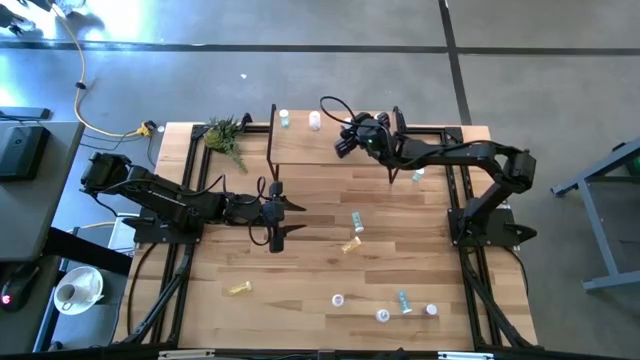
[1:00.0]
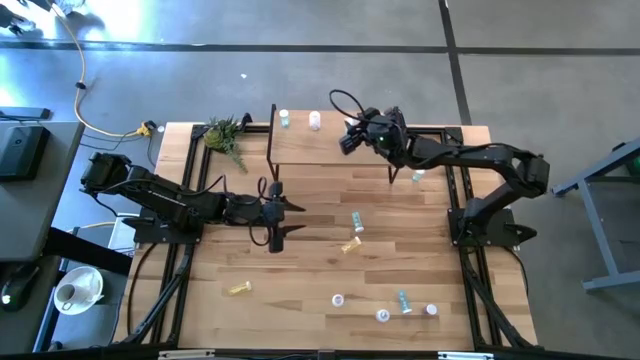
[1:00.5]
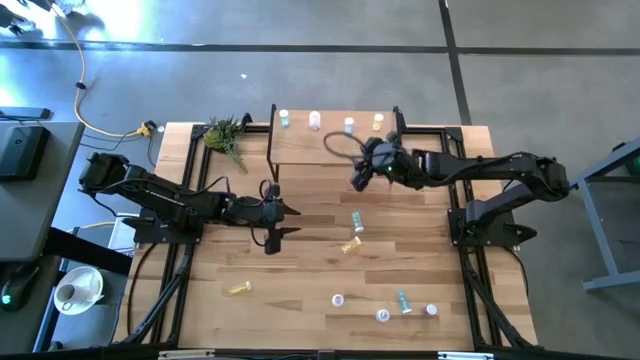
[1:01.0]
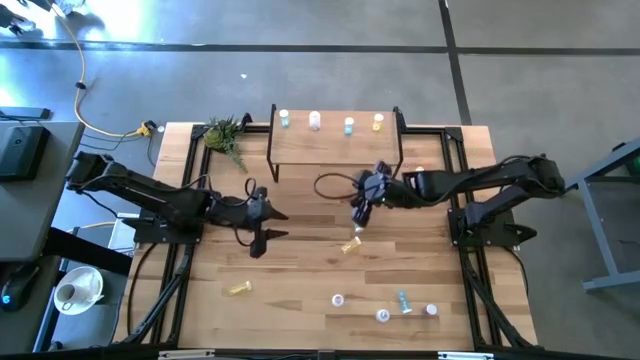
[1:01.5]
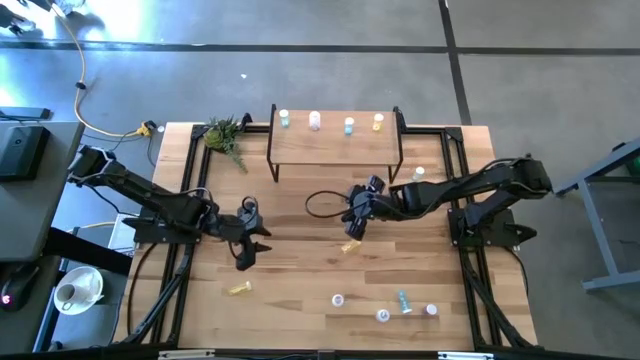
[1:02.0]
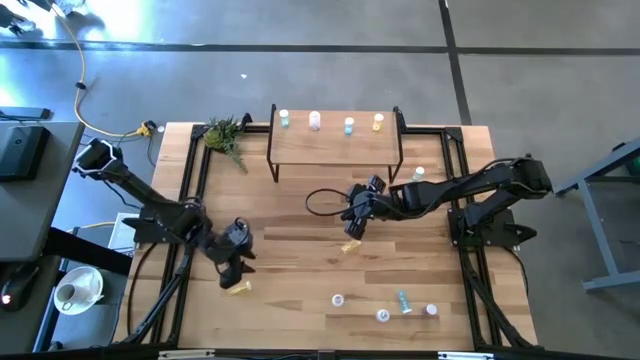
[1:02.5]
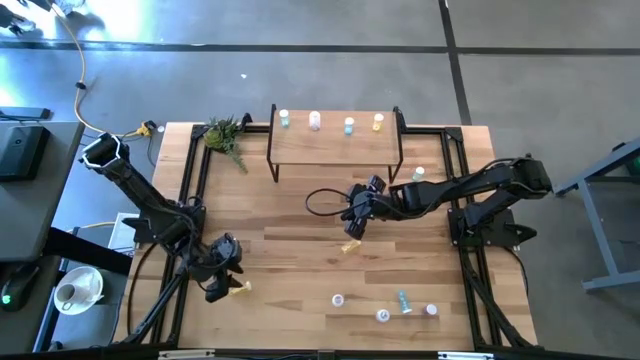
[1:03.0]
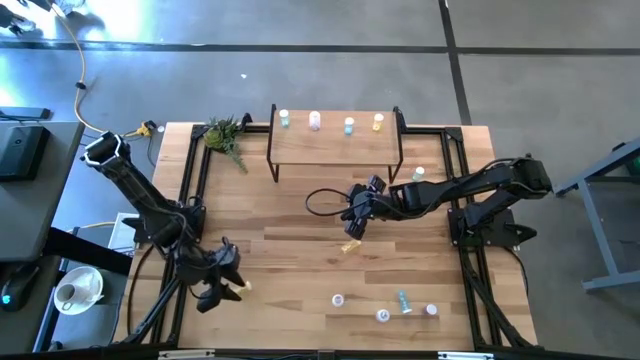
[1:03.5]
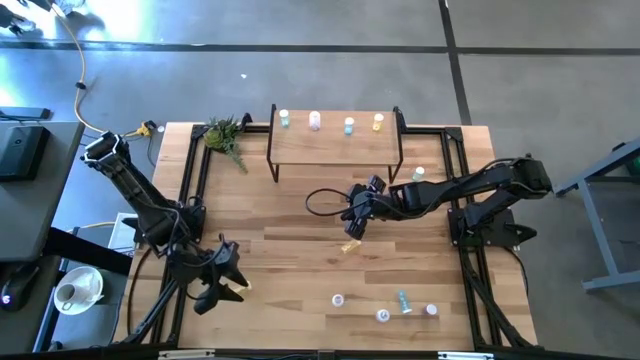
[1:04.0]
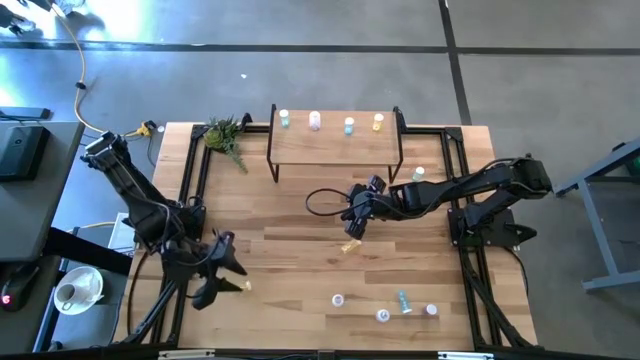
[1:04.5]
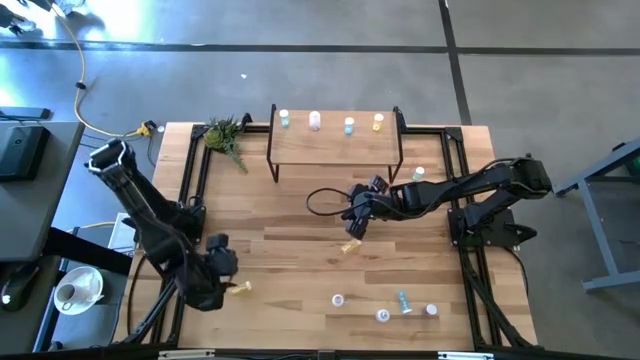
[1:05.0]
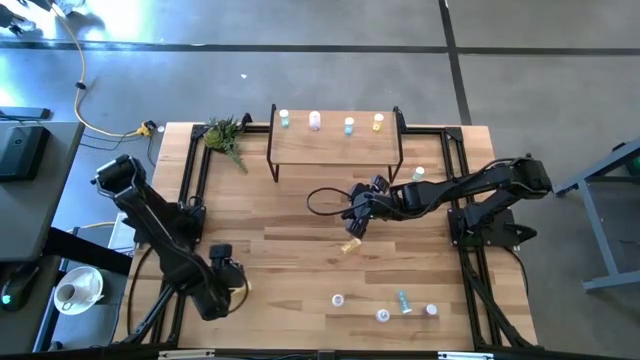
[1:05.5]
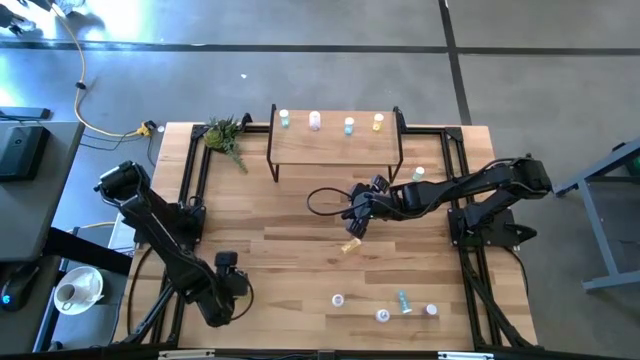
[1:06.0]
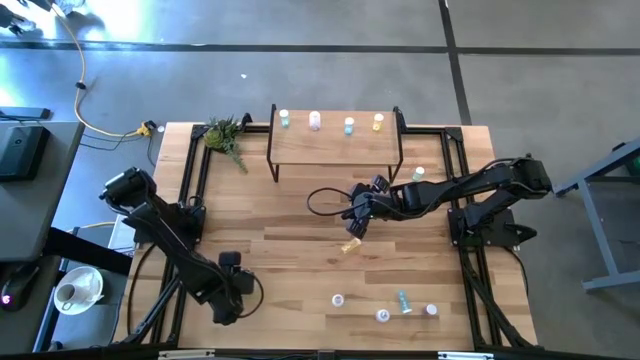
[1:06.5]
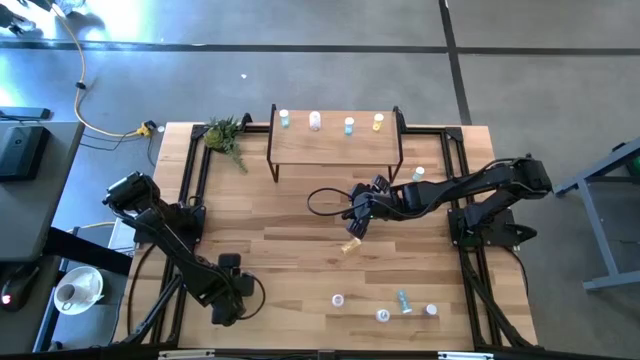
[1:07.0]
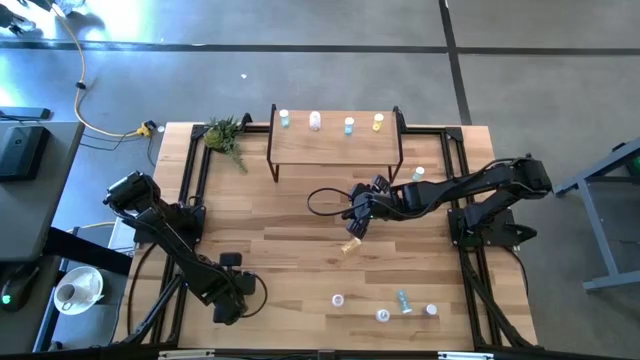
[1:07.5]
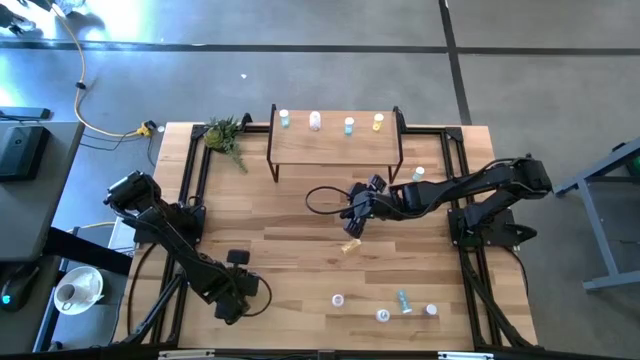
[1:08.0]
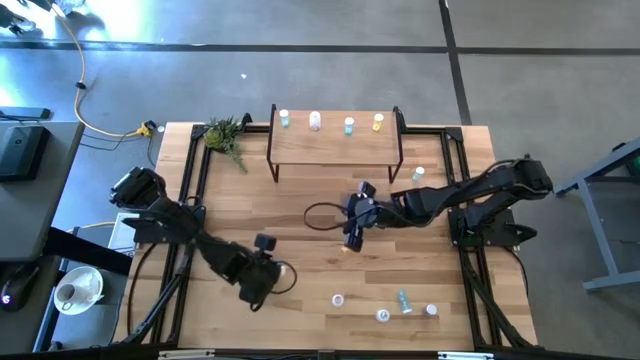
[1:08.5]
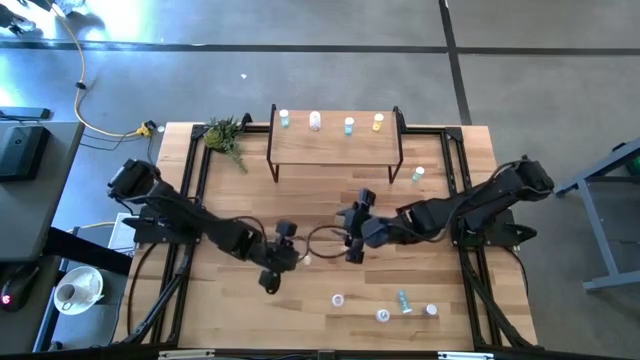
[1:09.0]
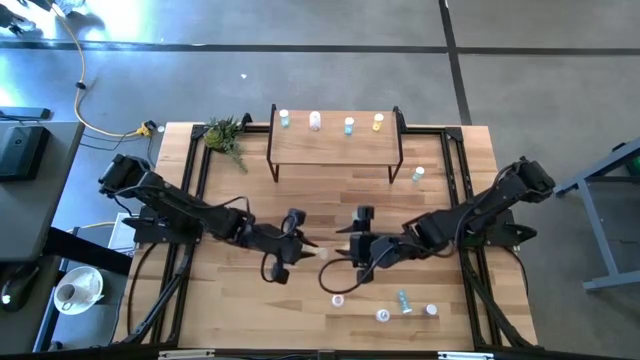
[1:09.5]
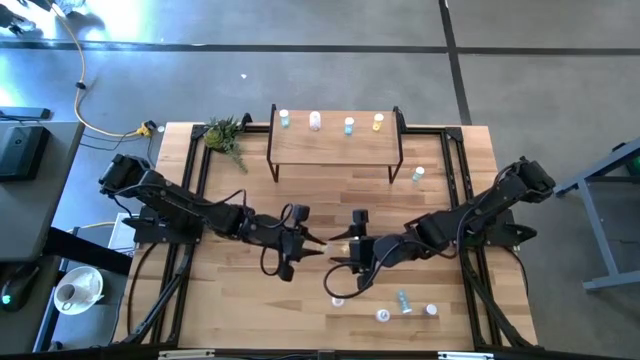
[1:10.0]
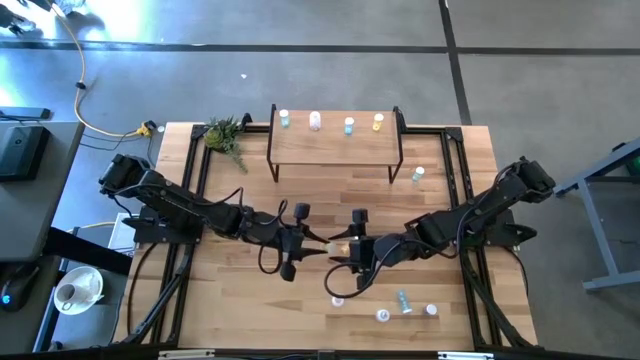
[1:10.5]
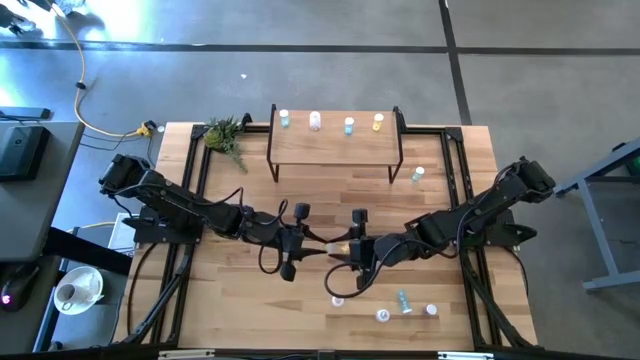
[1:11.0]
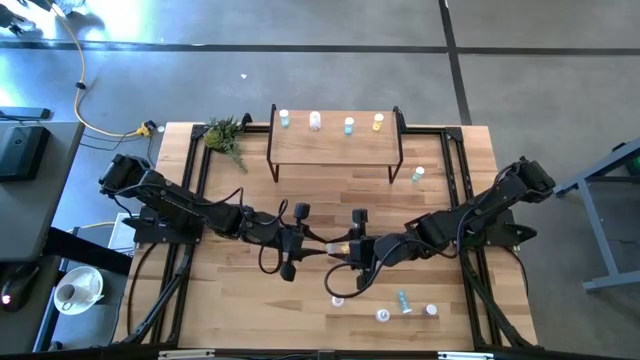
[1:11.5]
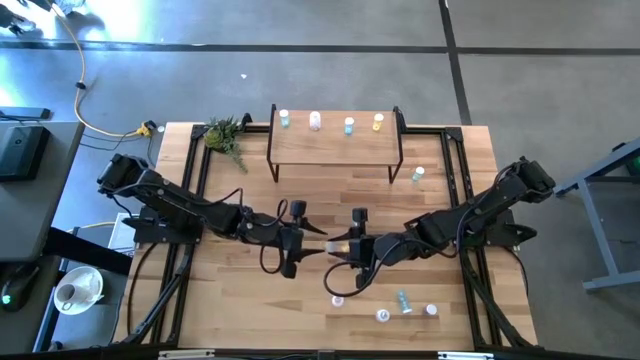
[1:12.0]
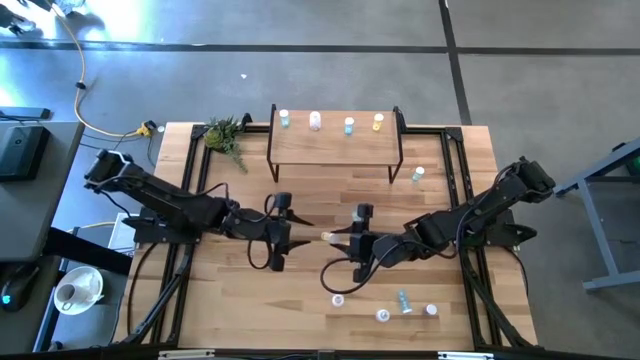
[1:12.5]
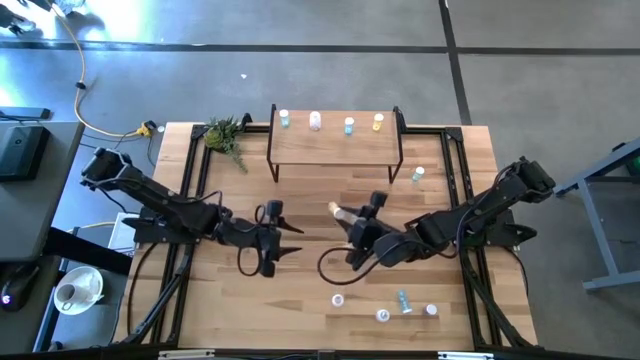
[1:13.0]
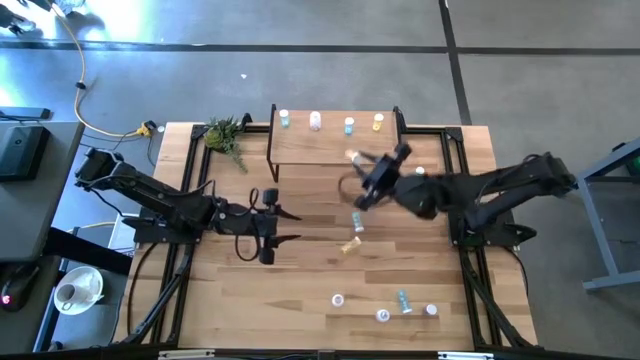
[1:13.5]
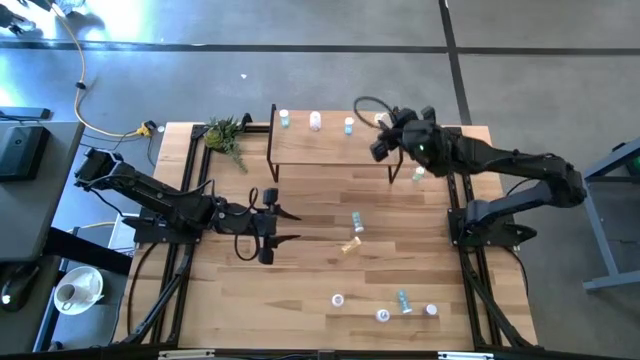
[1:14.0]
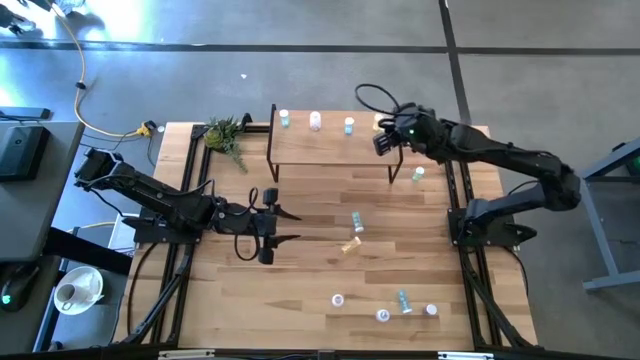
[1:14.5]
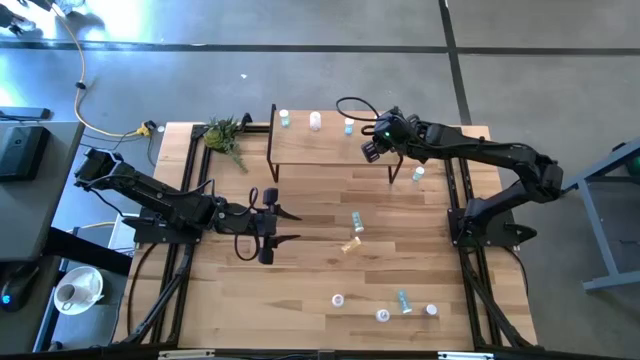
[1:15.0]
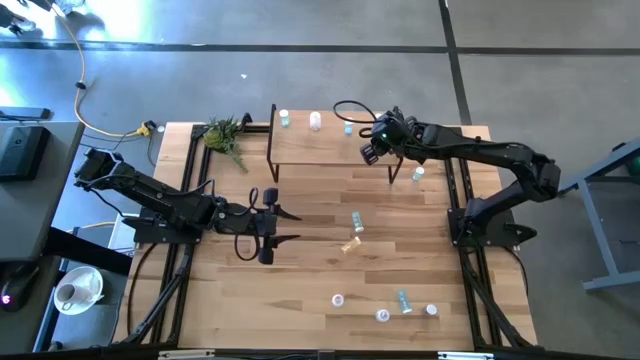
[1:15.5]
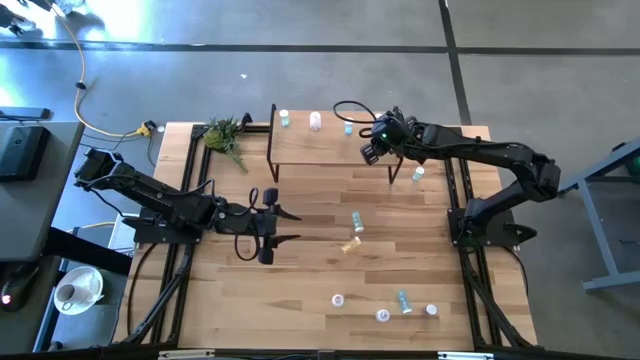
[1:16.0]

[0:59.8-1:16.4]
Task: Pick and place medicine bottles onto shelf by color
Put the bottom yellow pill bottle on the shelf aligned with the other yellow pill bottle
